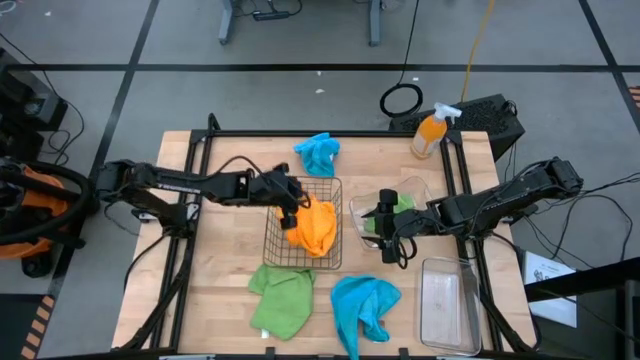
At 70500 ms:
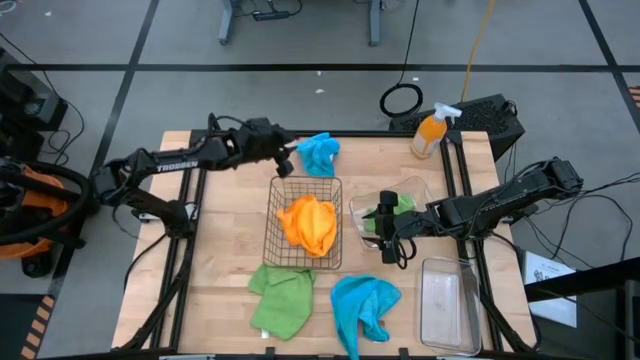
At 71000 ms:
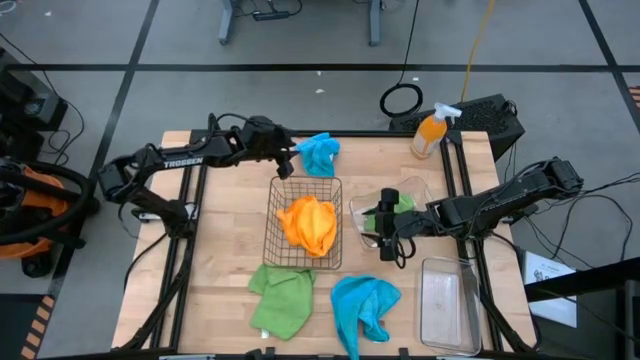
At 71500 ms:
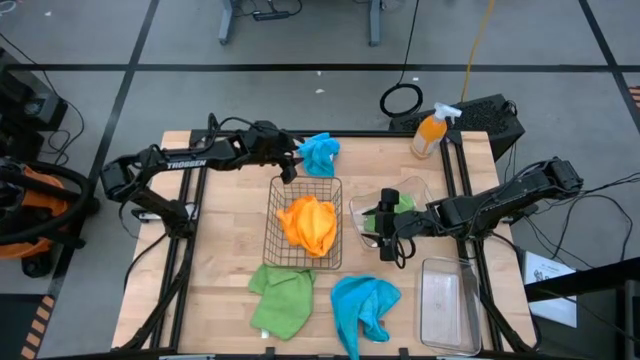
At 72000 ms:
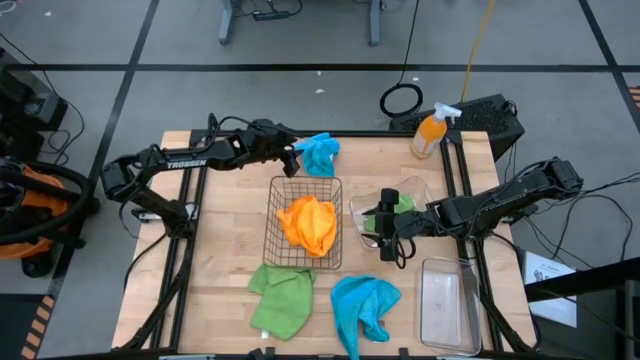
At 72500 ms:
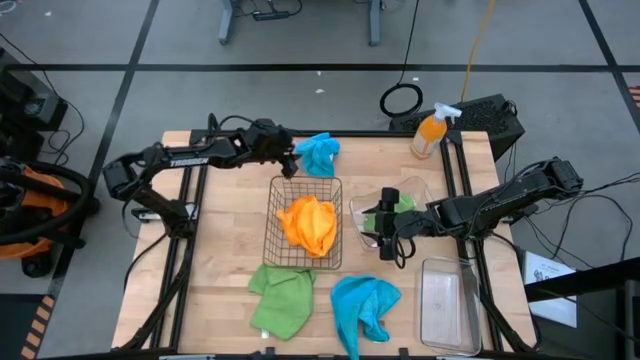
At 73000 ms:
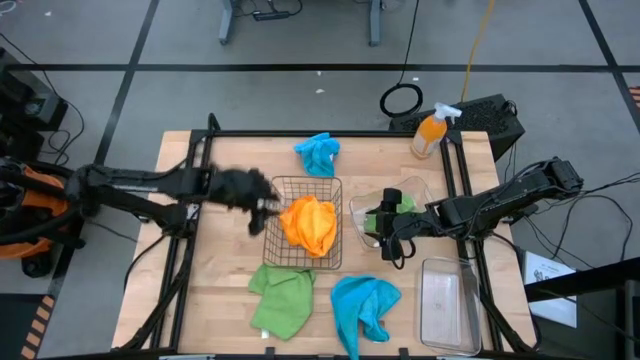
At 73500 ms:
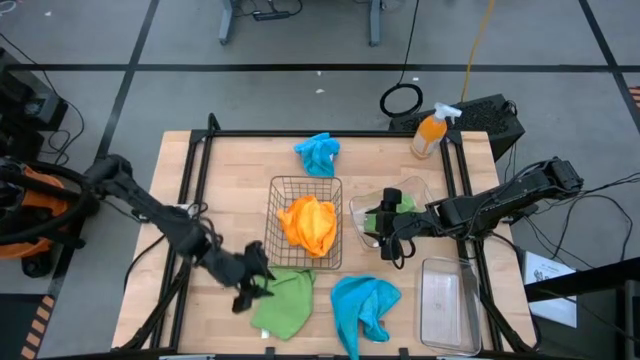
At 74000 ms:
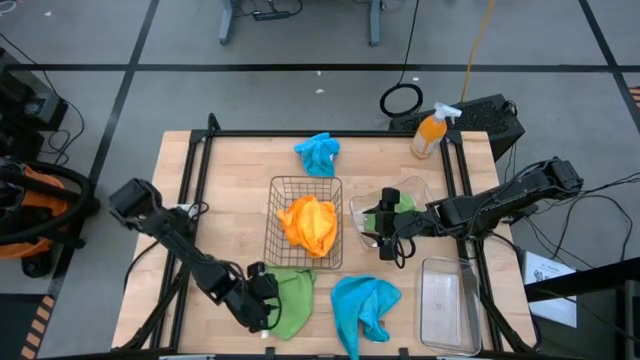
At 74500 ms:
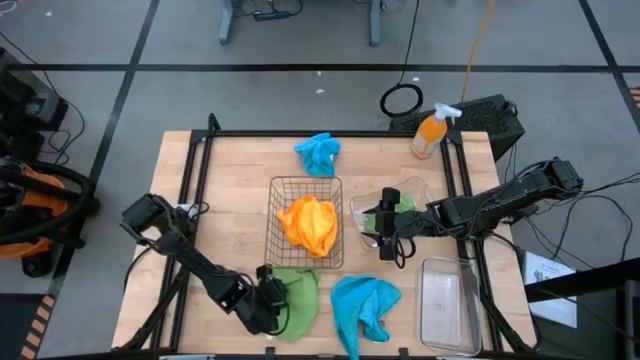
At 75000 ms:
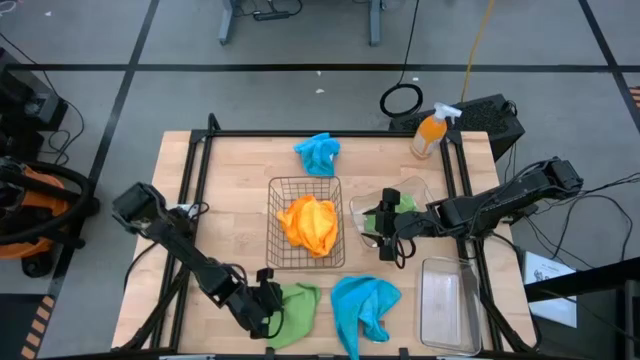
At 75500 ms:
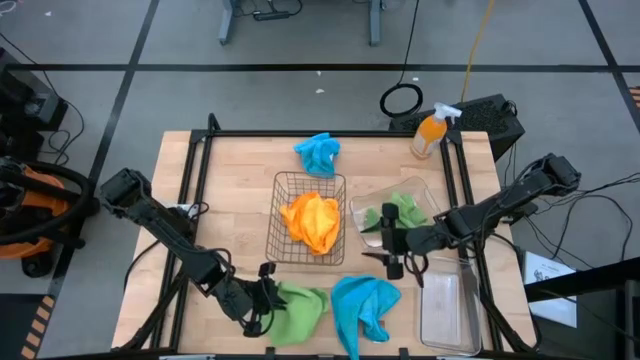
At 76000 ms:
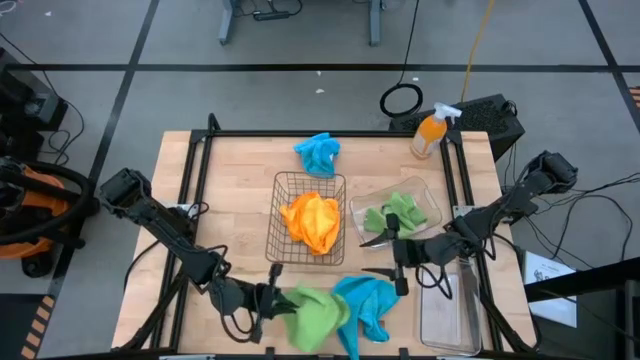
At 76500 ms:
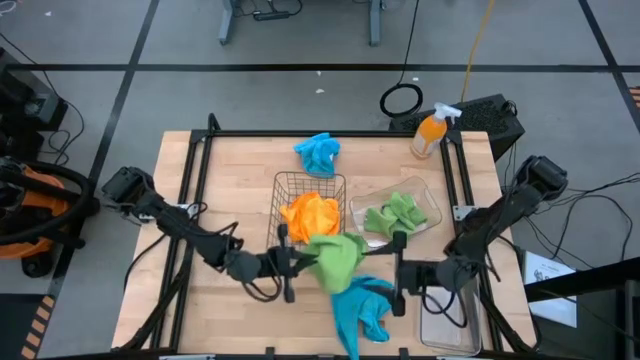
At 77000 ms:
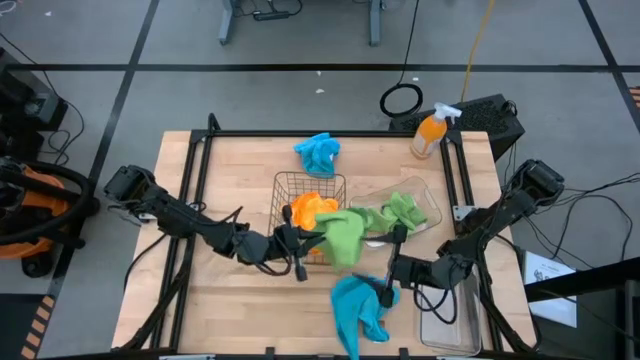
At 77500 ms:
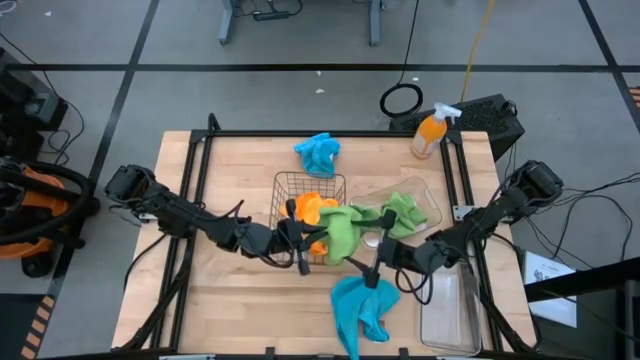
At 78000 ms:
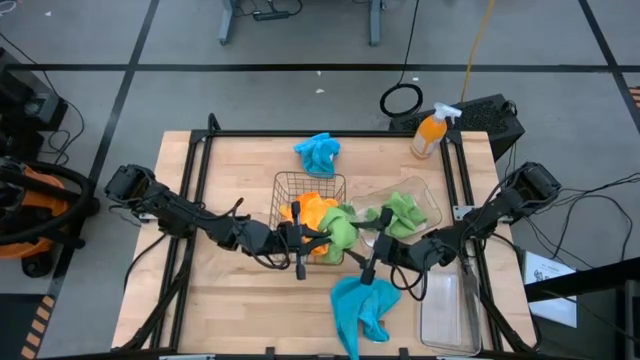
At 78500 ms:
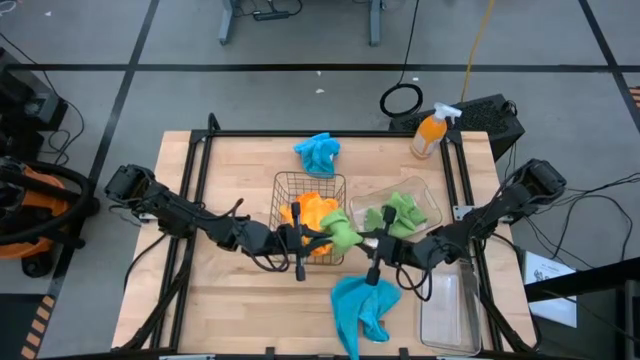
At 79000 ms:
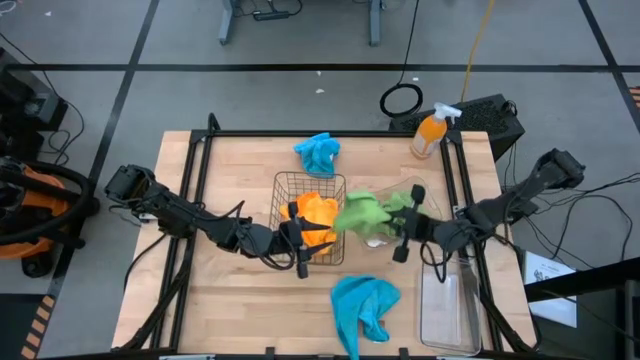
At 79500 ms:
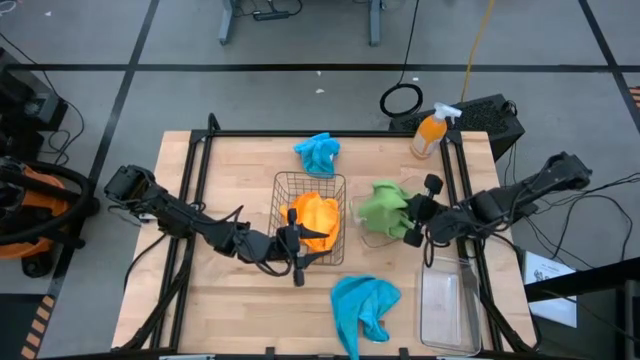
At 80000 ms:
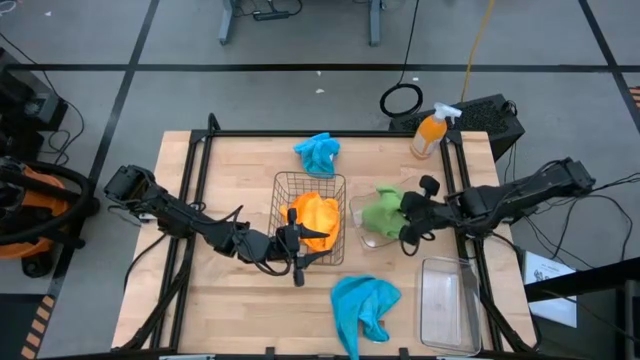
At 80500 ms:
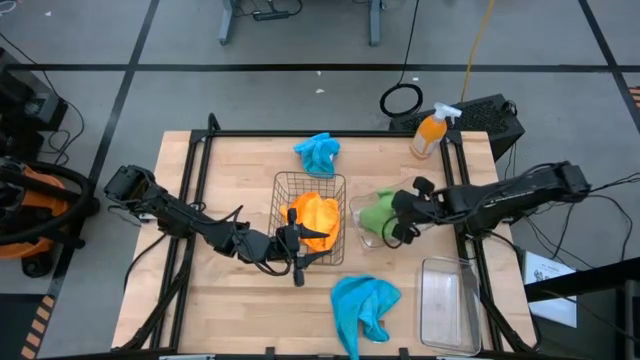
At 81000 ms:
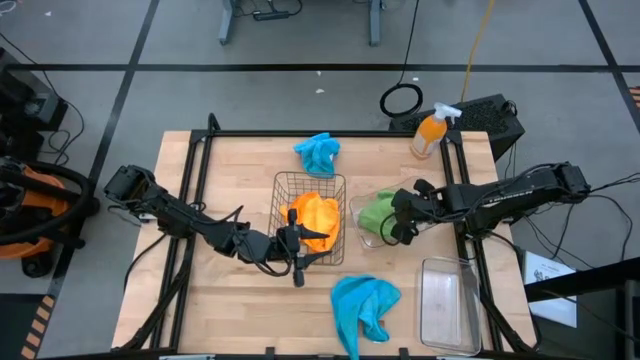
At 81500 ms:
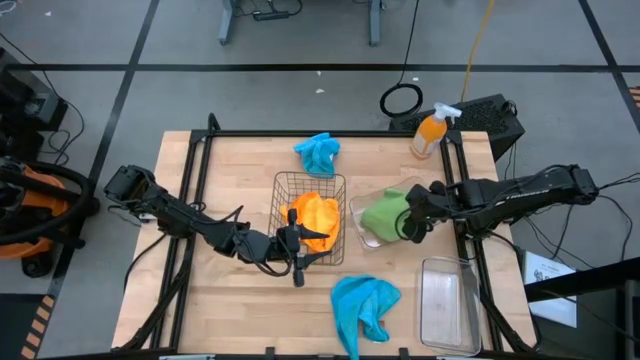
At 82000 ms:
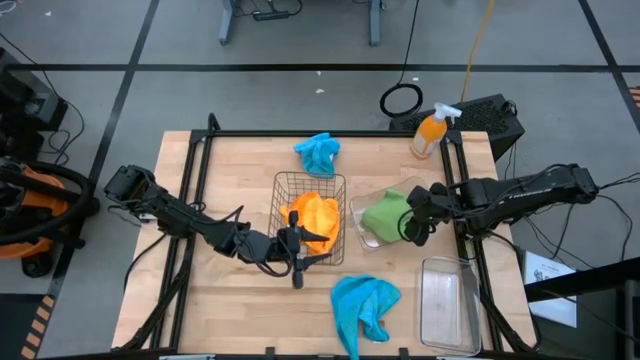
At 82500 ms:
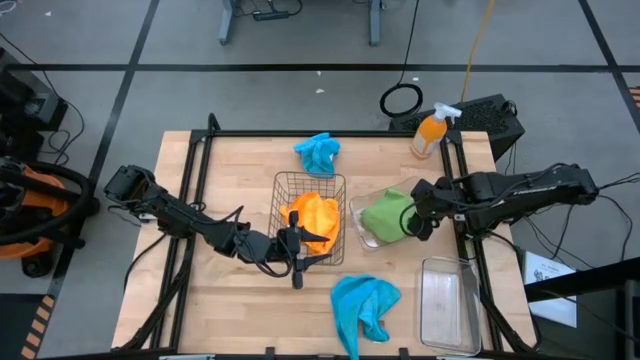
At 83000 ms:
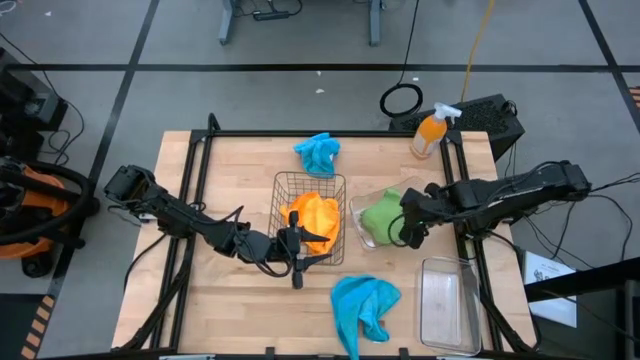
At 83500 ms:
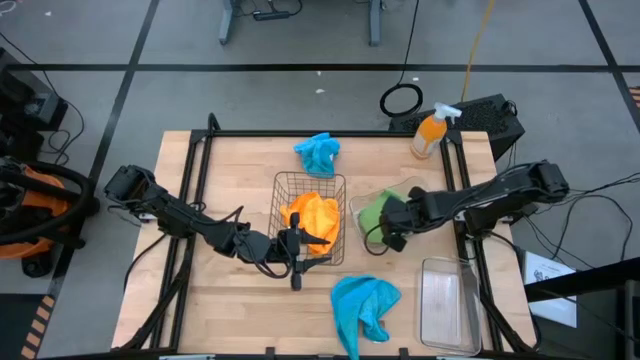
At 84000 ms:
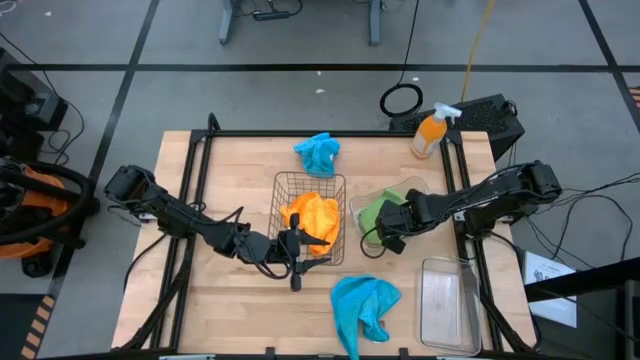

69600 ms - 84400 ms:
Task: Sort microfiber towel by color & place in baskets
Put the green towel into the top transparent bin

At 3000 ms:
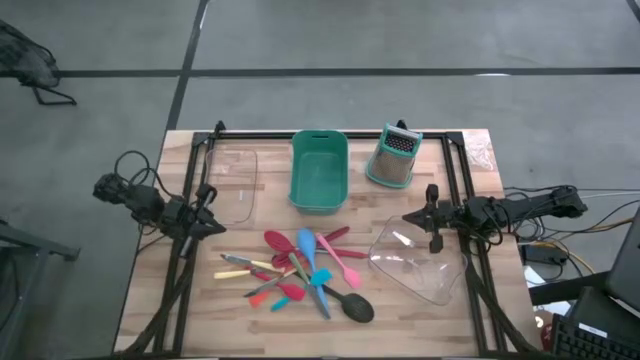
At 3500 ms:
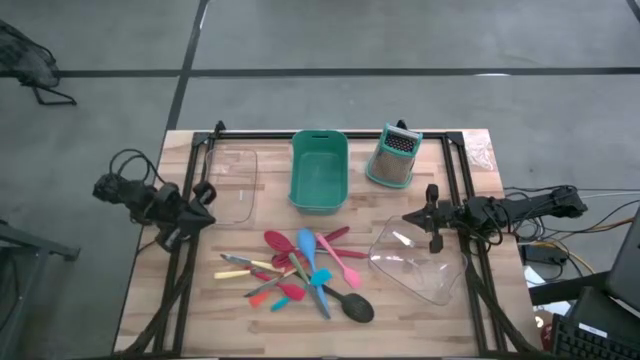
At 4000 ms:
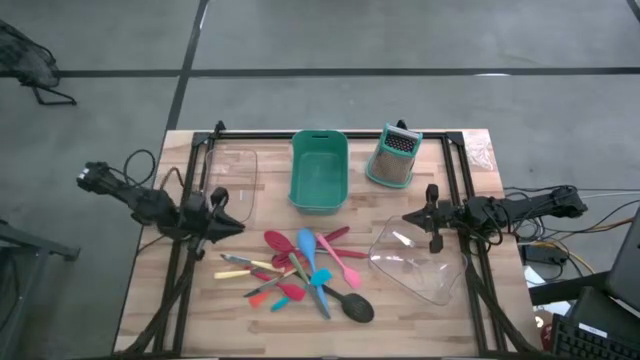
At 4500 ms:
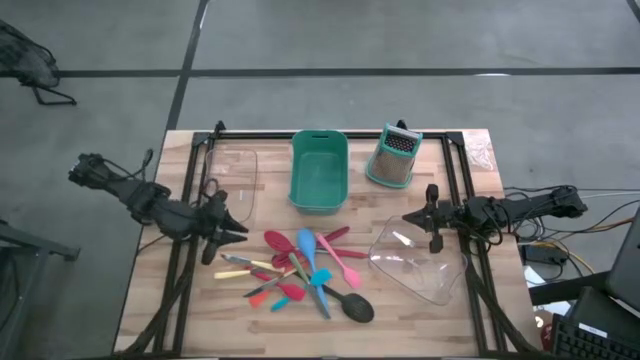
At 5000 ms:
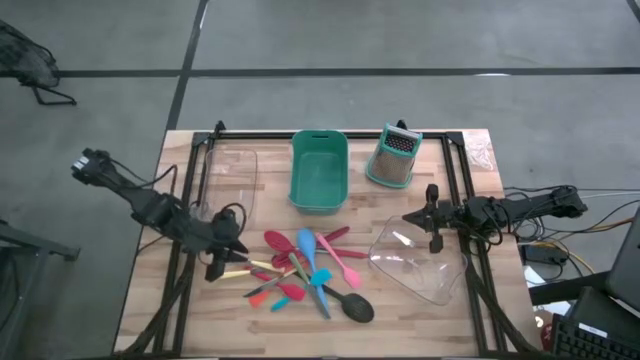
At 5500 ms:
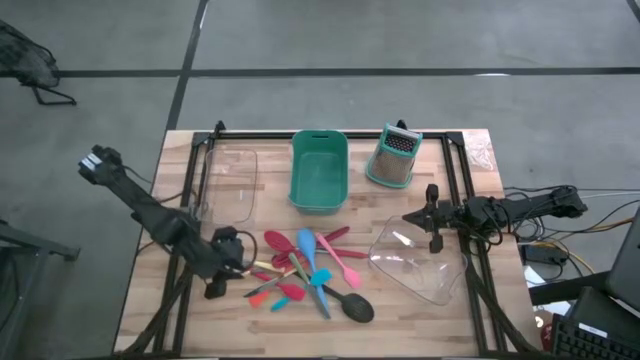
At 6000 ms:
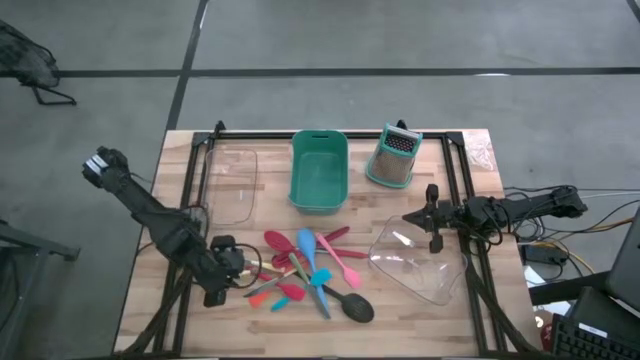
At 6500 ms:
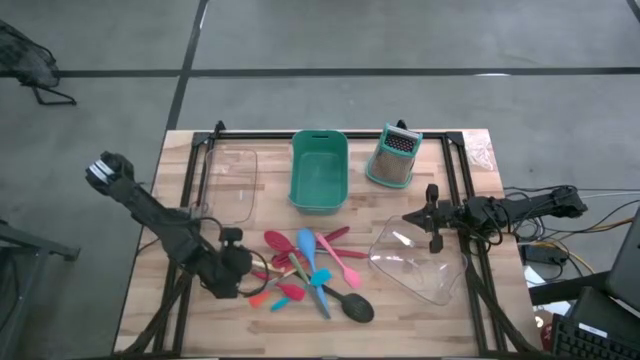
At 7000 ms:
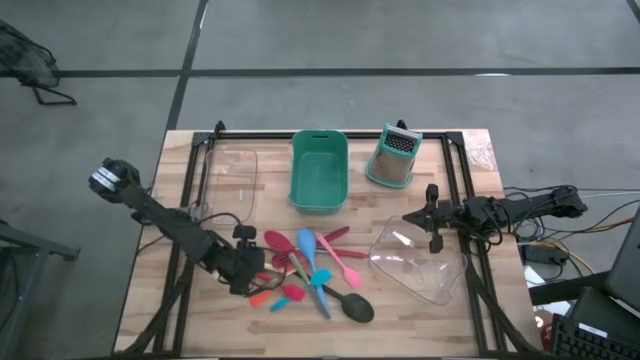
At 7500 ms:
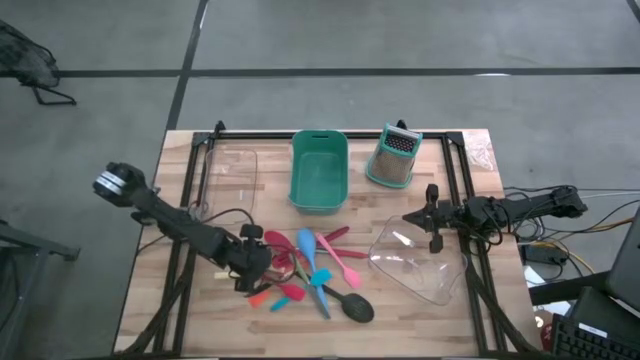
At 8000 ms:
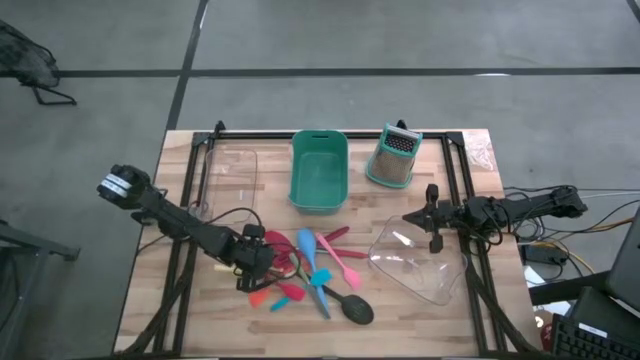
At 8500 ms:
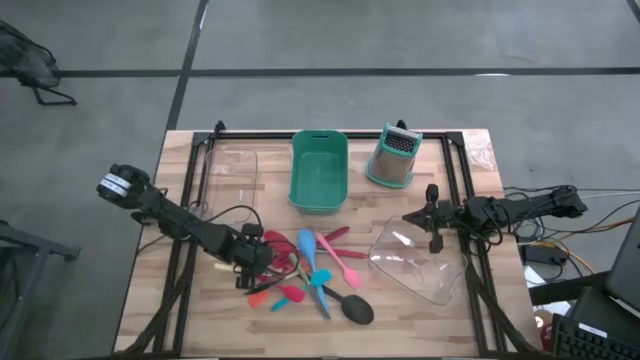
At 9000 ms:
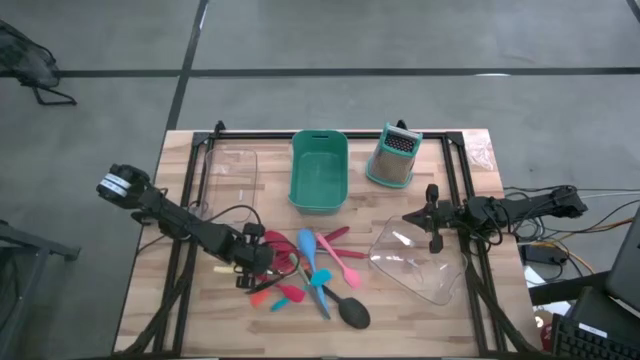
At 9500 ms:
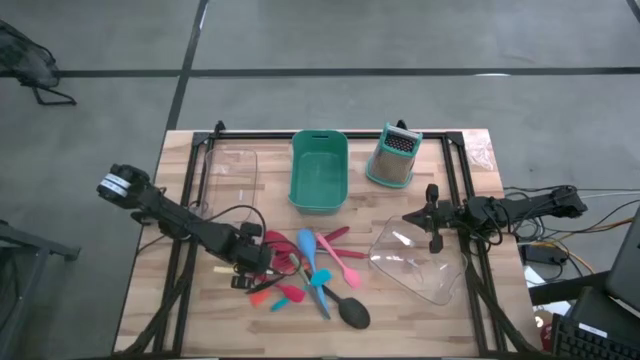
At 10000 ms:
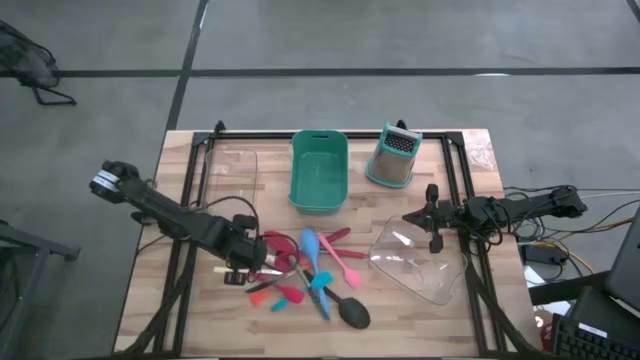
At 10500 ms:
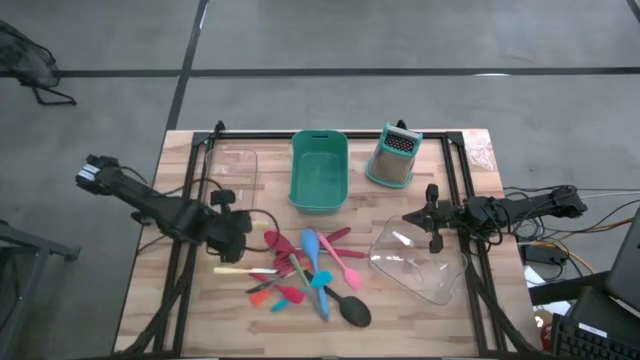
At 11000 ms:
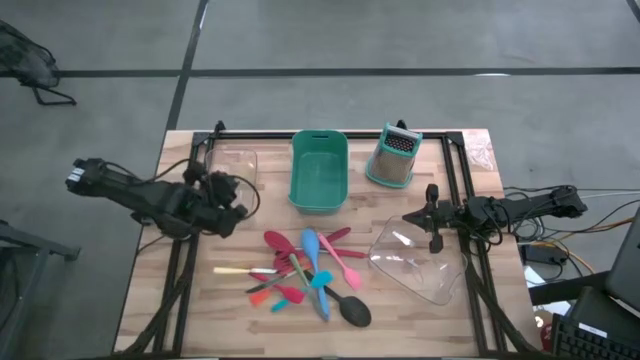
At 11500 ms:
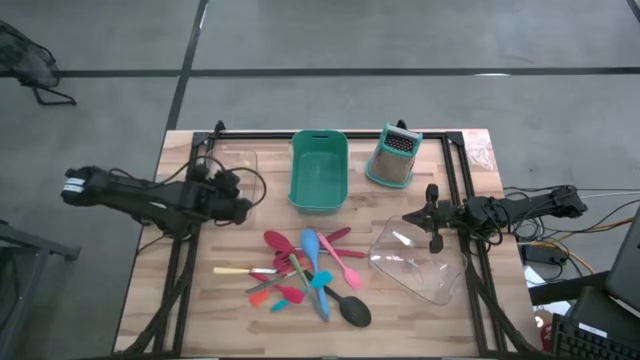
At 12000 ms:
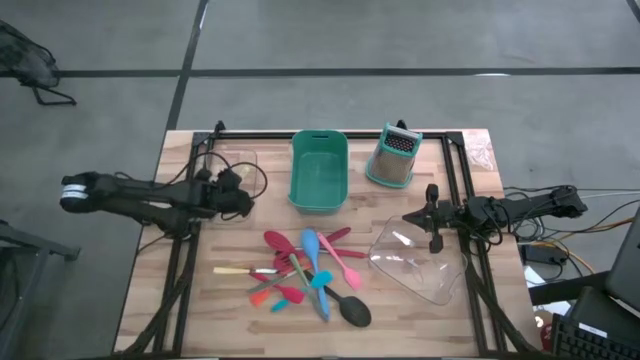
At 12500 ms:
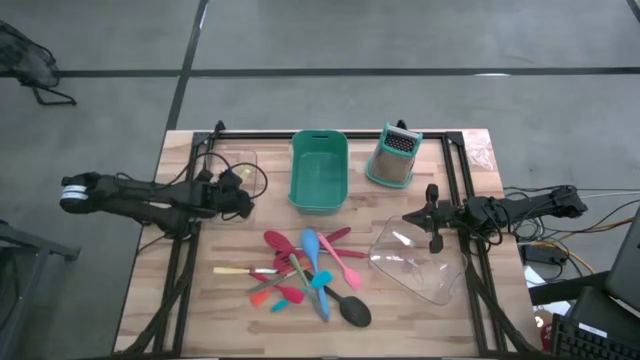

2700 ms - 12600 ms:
Task: Pick & Place Kitchen Items
Put the yellow table knife into the top transparent bin
